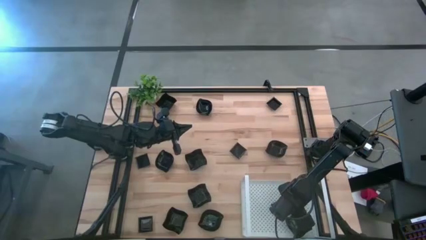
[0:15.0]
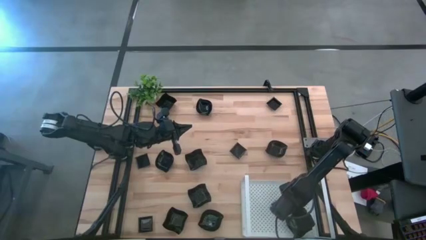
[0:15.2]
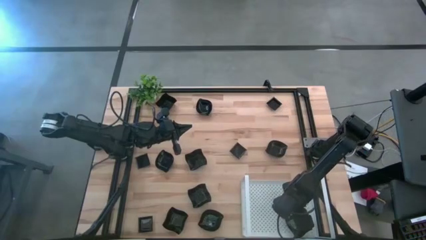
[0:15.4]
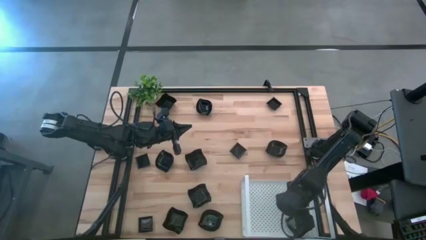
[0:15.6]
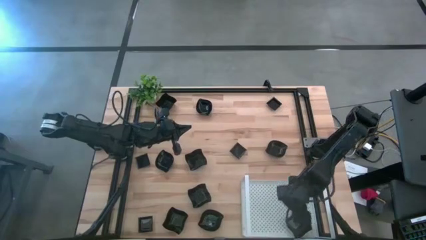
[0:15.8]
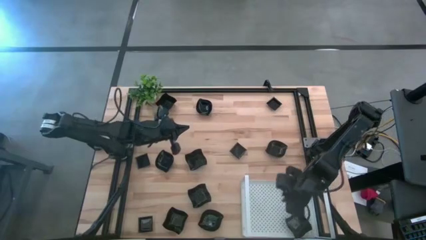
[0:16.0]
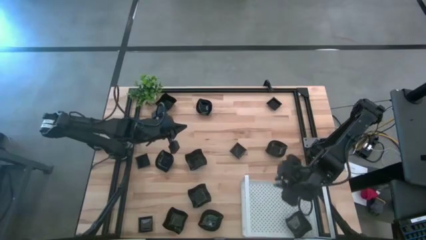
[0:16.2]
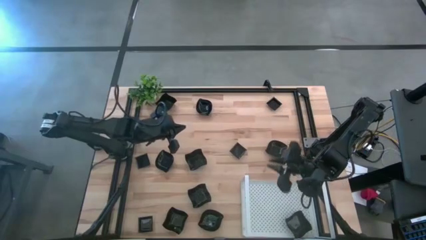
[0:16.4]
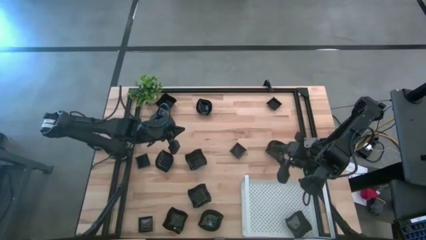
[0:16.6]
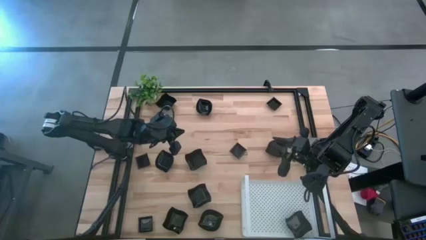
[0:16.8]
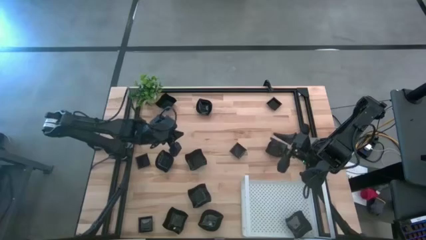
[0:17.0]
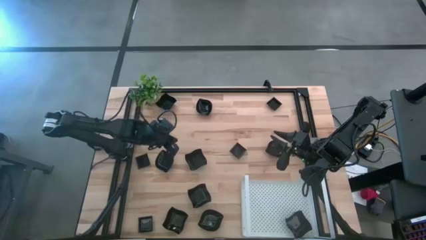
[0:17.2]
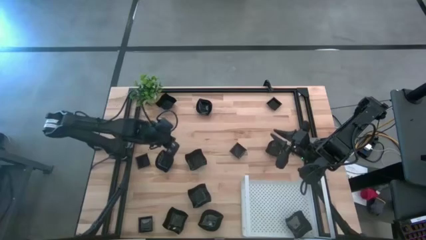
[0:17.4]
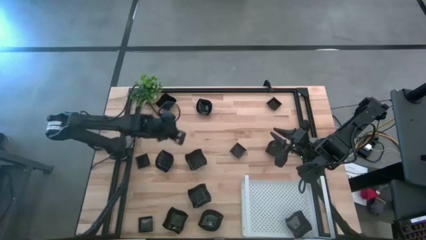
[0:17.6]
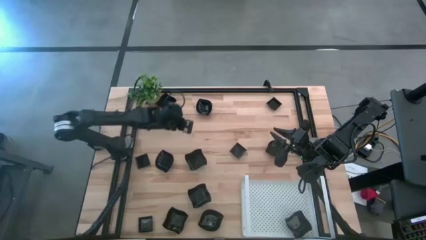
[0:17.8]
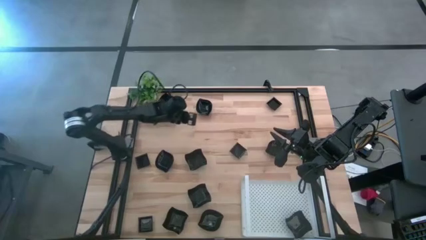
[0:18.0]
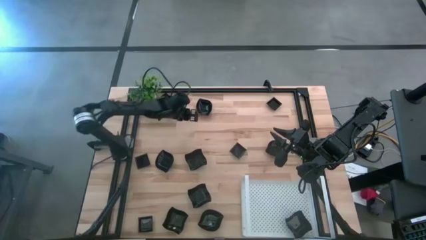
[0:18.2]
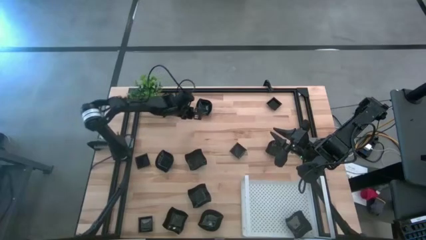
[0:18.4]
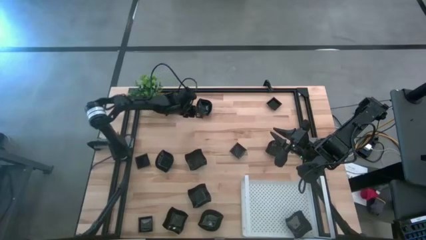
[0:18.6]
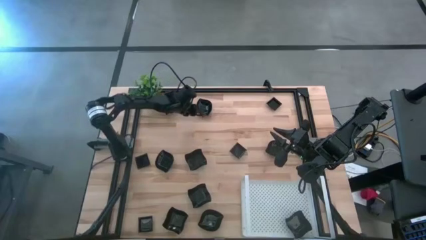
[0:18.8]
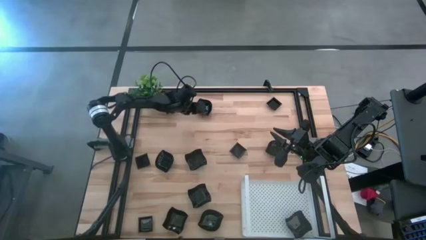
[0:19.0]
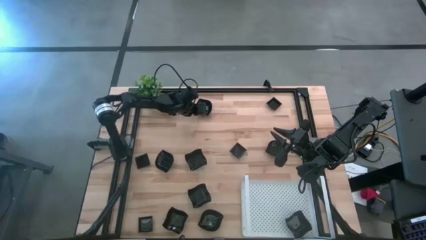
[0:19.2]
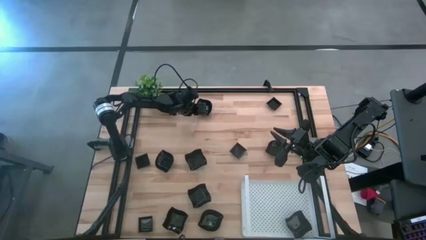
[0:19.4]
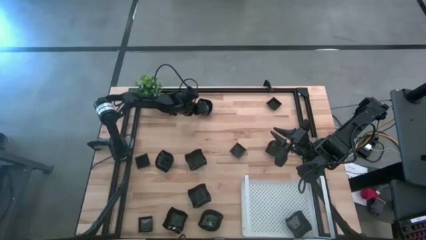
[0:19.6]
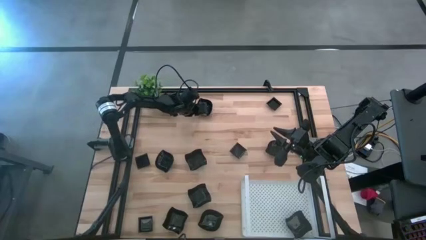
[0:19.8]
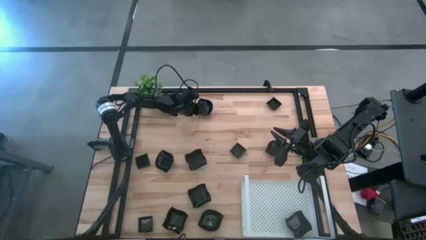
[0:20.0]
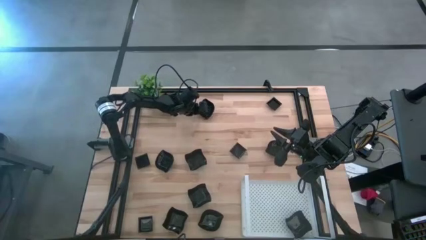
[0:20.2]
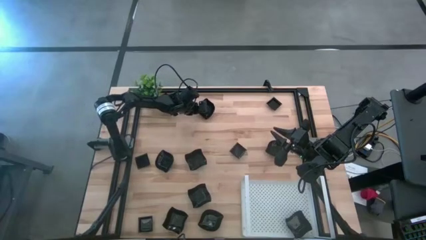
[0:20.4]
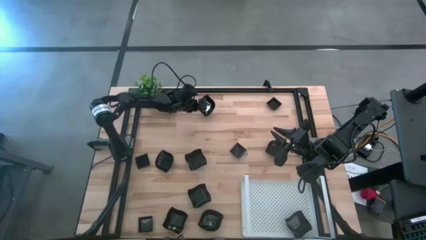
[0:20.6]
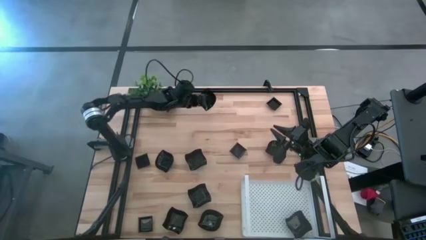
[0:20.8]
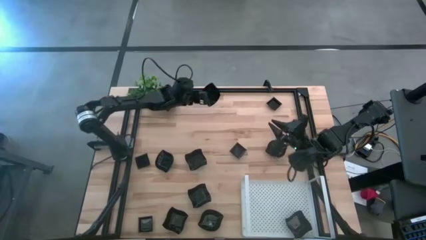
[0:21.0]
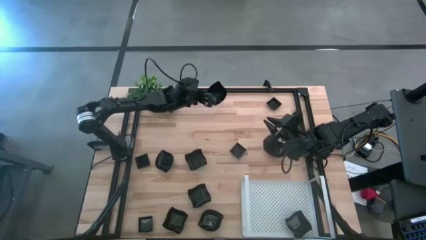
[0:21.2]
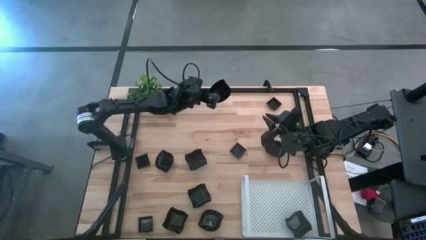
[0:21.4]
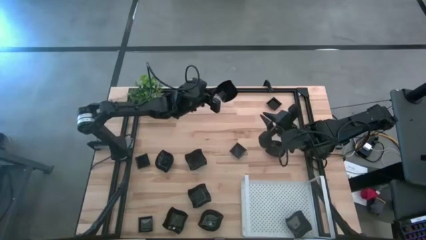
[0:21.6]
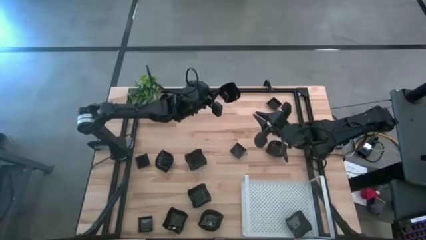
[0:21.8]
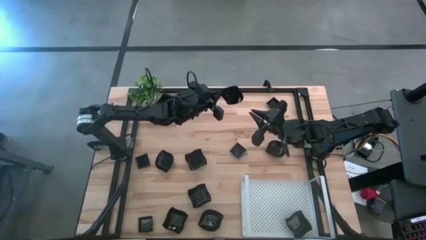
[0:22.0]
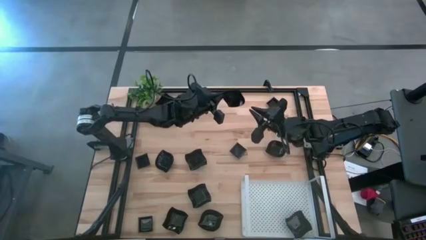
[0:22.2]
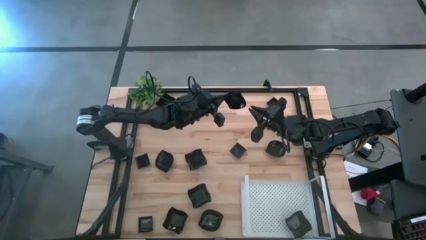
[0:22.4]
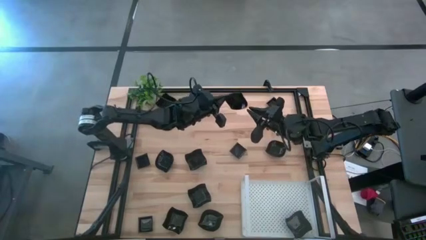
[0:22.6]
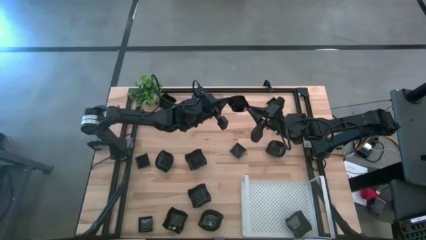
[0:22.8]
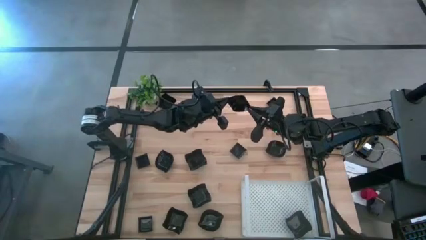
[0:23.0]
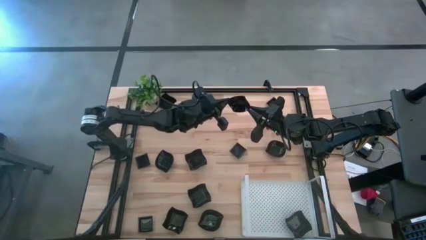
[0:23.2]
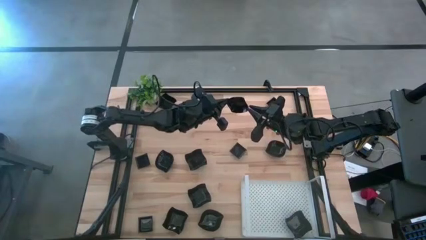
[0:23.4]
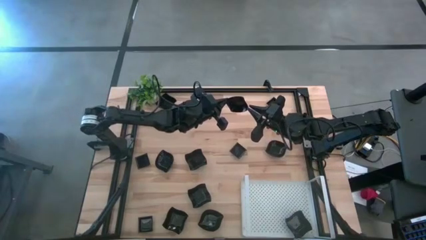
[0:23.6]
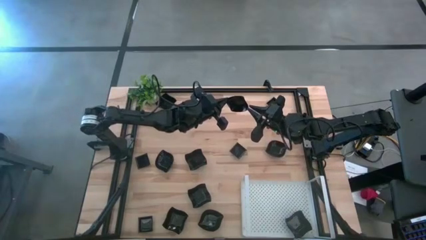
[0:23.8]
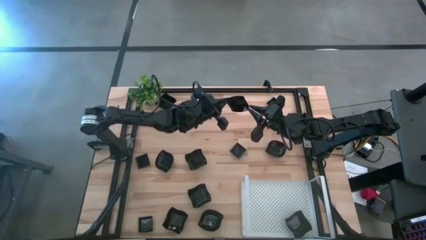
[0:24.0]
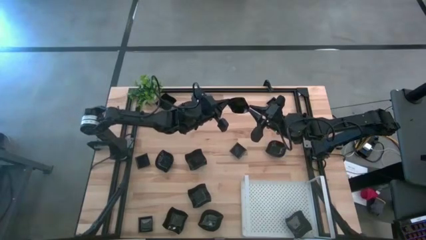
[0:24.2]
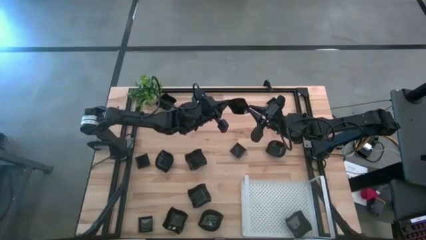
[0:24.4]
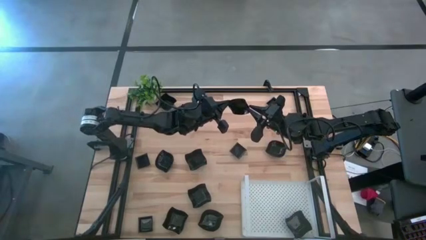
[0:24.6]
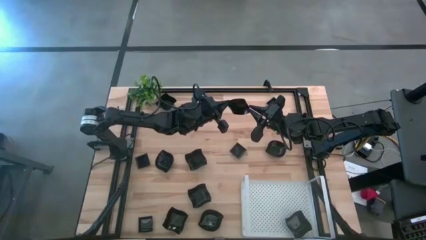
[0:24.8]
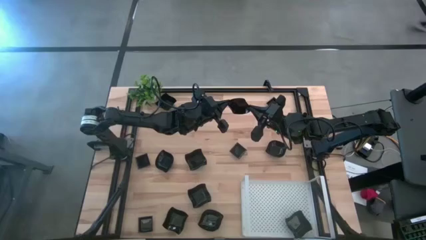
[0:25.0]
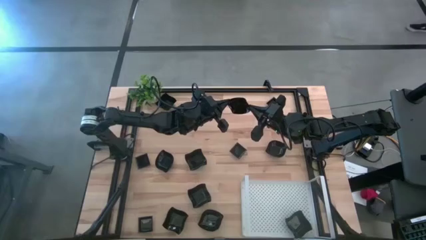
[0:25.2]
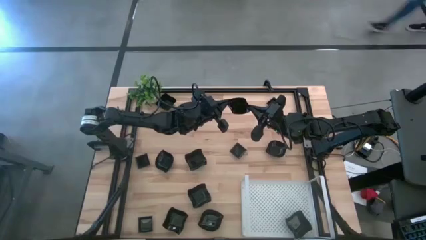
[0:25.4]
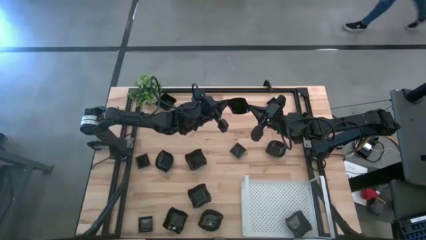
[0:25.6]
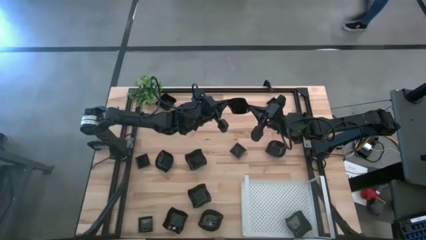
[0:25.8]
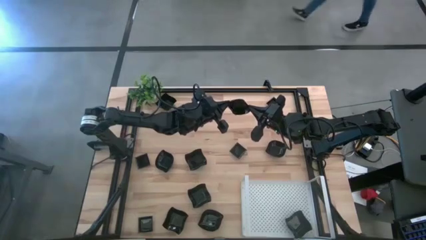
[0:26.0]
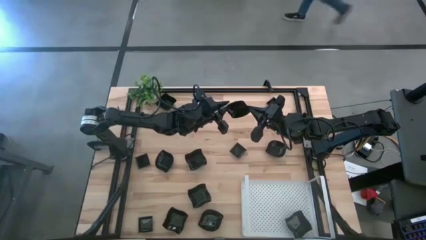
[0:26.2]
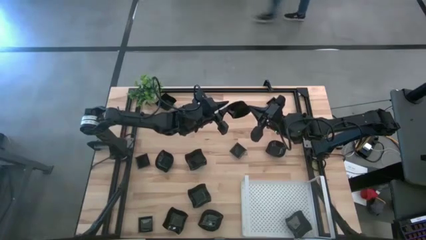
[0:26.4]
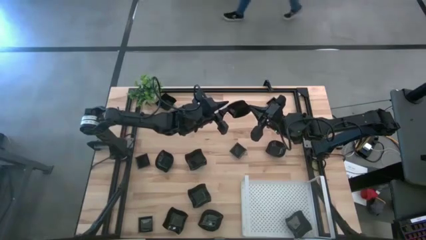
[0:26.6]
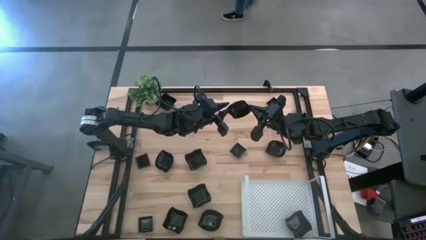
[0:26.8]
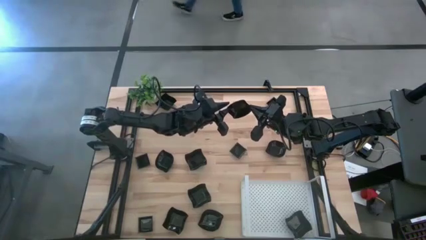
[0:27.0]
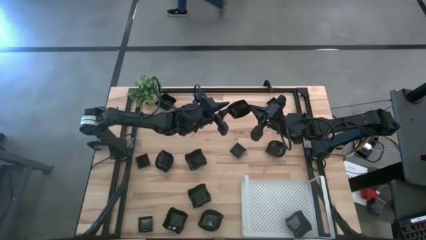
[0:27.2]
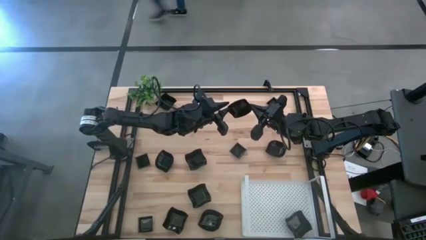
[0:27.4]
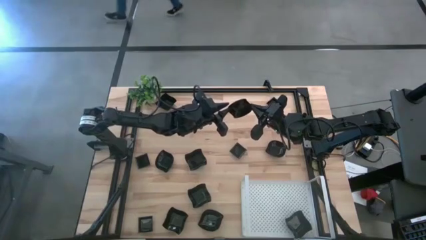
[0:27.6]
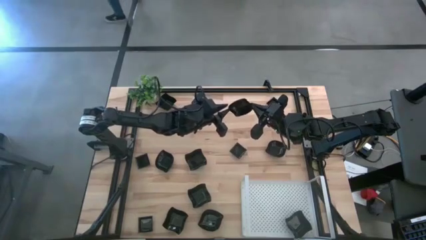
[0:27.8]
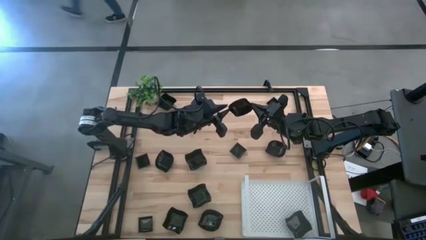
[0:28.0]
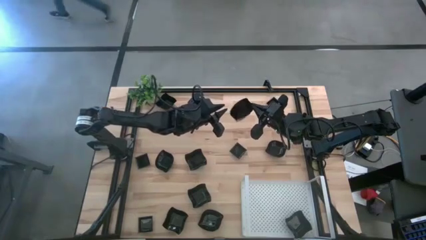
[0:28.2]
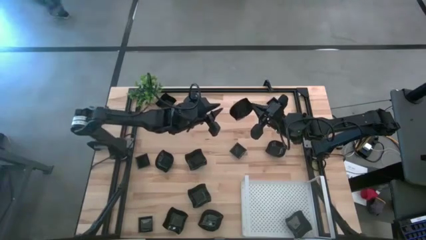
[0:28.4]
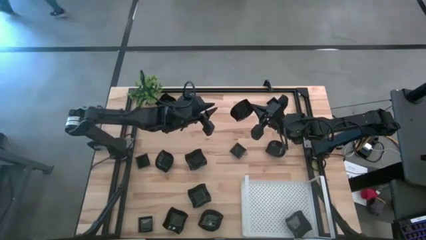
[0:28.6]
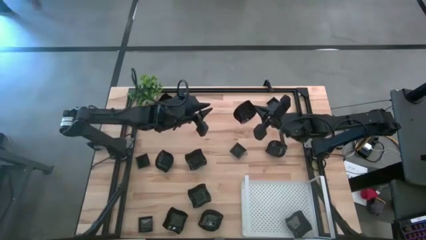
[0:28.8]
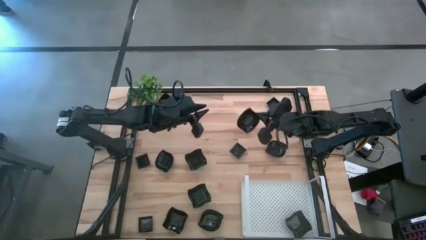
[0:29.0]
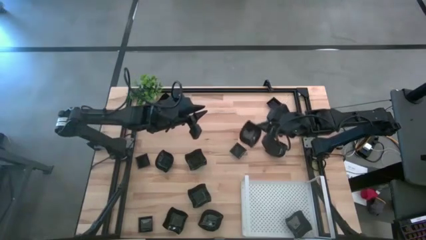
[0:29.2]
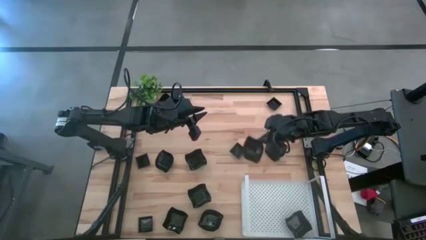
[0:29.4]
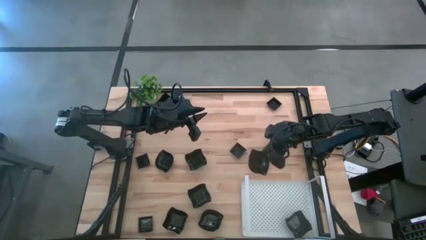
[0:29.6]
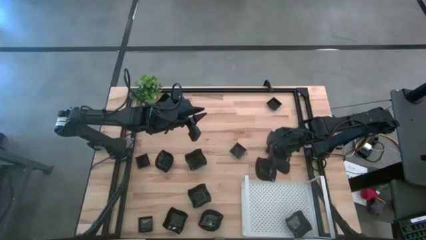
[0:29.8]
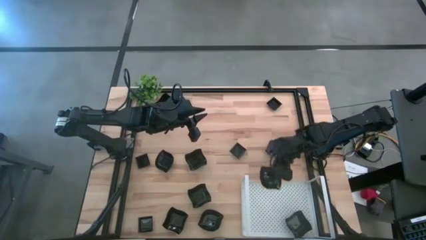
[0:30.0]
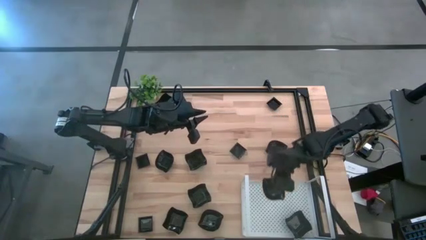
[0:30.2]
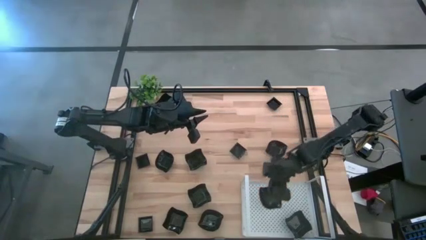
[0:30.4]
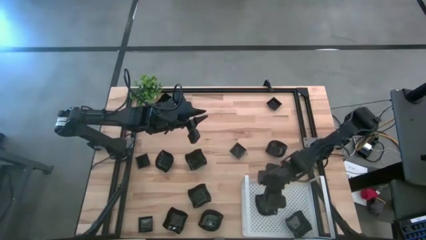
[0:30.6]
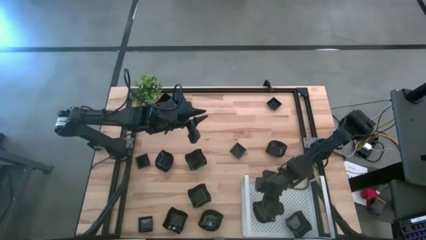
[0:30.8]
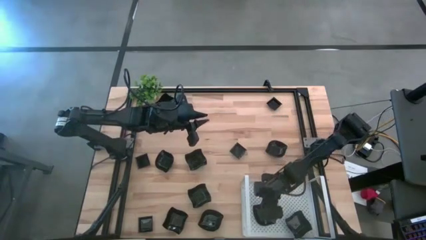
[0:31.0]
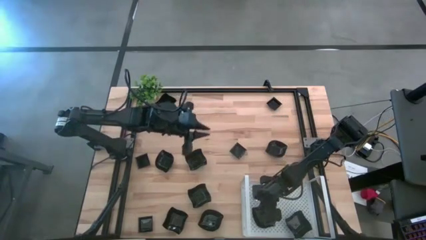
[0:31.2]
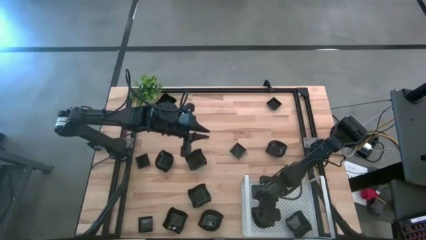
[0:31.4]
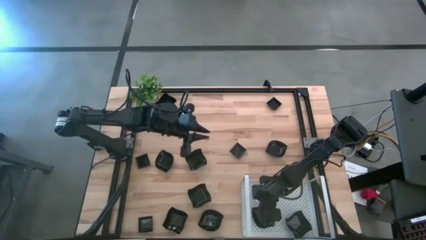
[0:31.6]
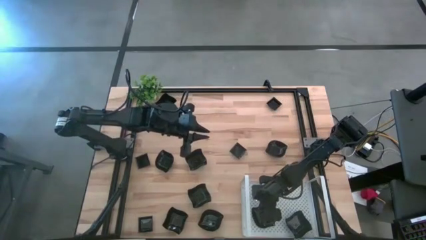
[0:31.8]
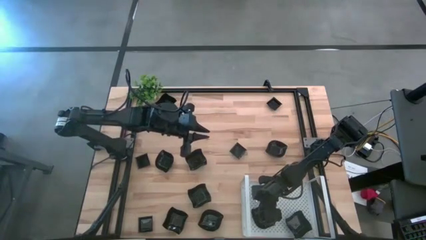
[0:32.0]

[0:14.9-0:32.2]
Task: Pick & Place Mini shaped plates
Put the leaf shaped plate on the shelf
